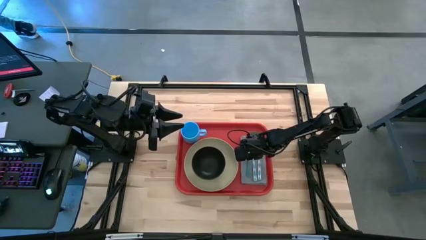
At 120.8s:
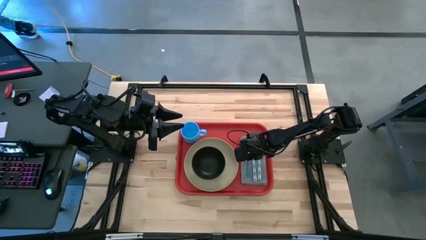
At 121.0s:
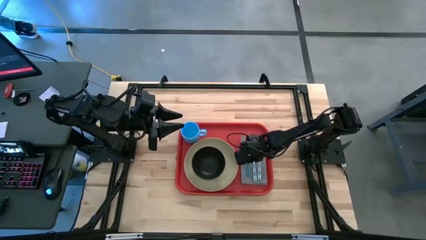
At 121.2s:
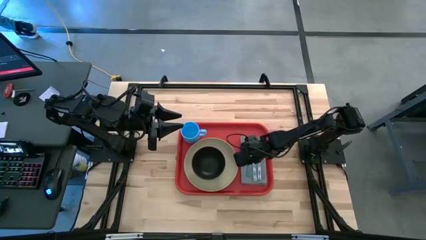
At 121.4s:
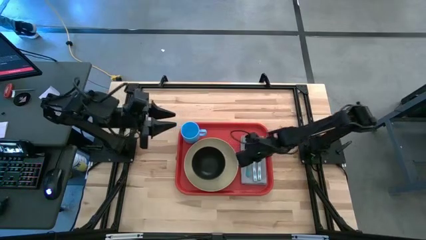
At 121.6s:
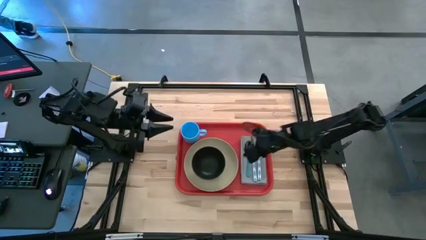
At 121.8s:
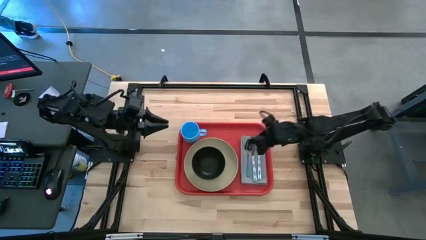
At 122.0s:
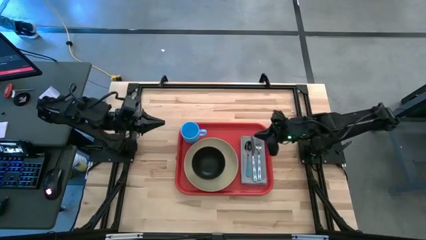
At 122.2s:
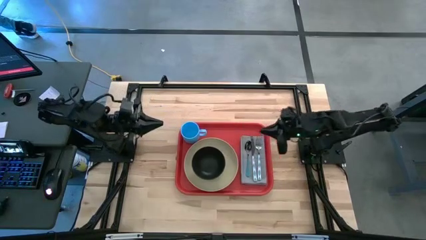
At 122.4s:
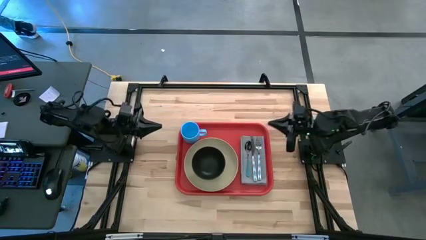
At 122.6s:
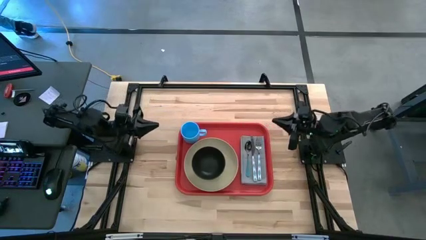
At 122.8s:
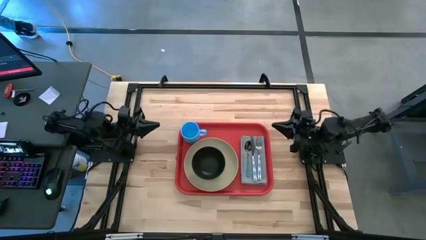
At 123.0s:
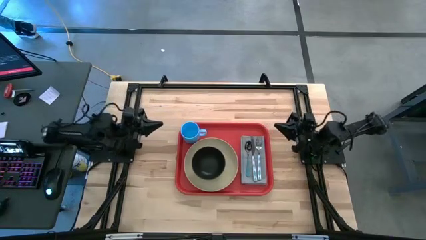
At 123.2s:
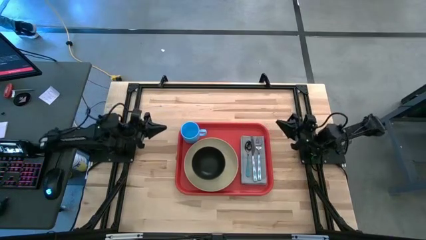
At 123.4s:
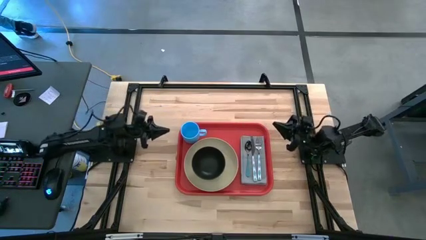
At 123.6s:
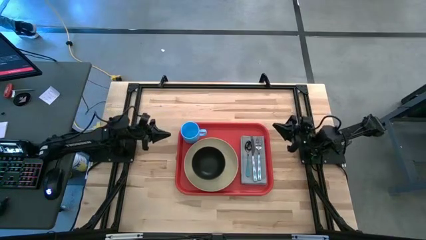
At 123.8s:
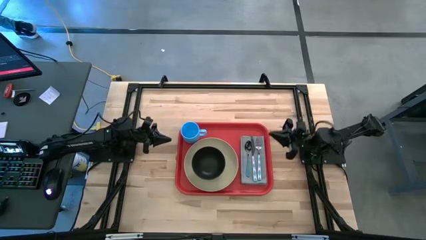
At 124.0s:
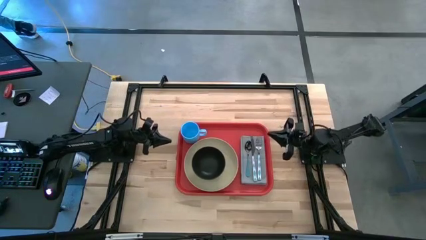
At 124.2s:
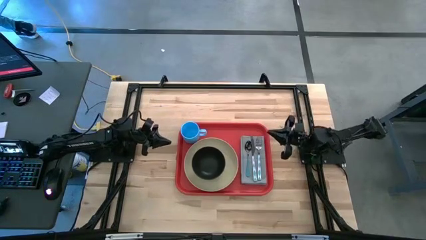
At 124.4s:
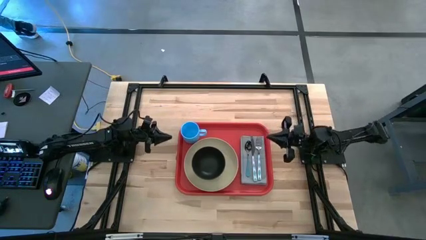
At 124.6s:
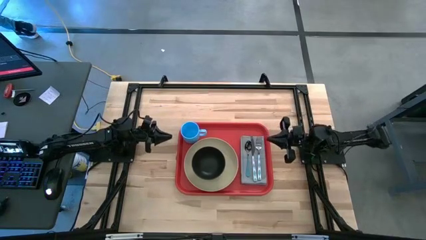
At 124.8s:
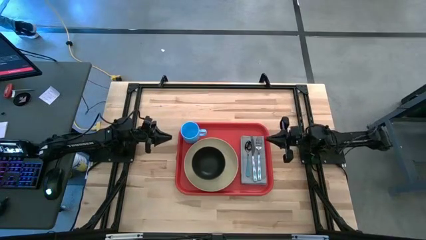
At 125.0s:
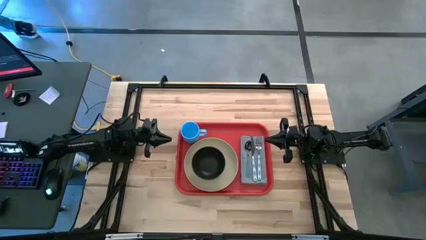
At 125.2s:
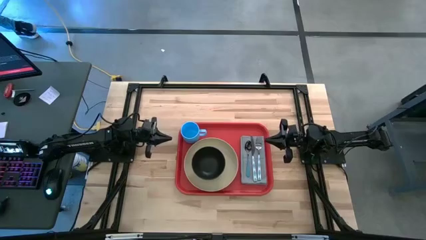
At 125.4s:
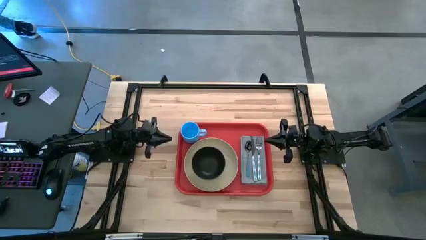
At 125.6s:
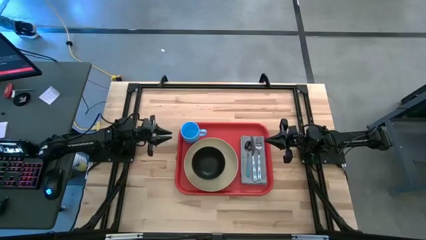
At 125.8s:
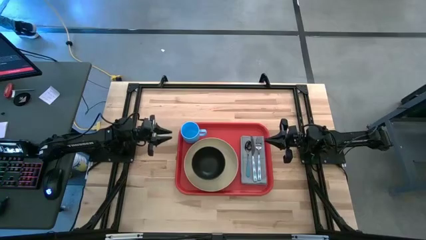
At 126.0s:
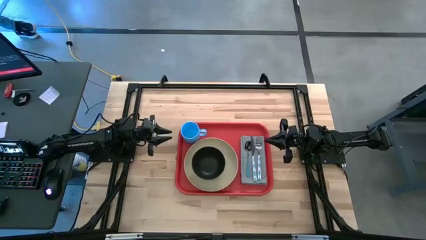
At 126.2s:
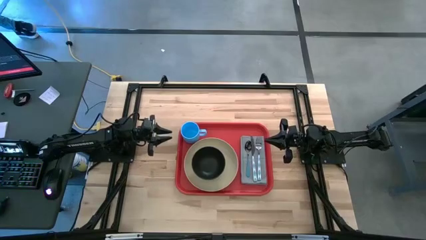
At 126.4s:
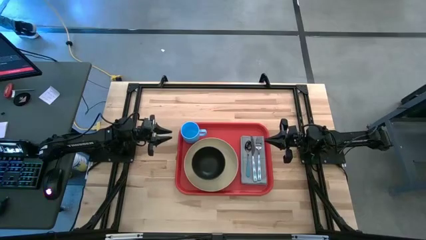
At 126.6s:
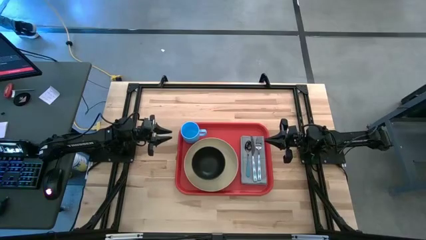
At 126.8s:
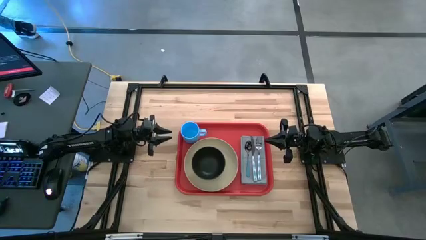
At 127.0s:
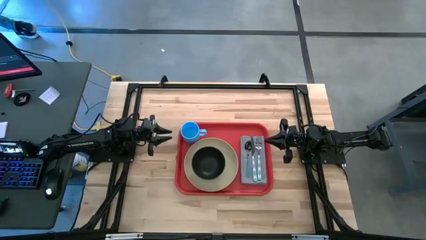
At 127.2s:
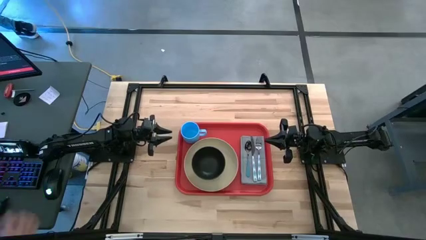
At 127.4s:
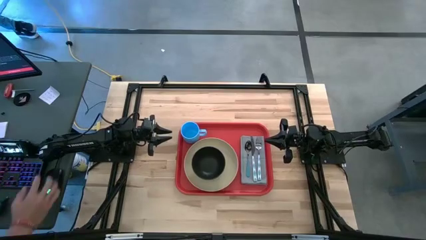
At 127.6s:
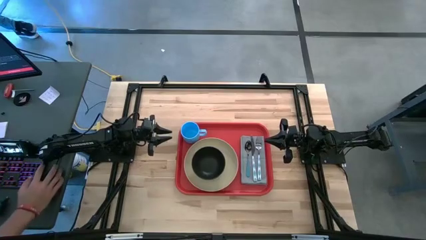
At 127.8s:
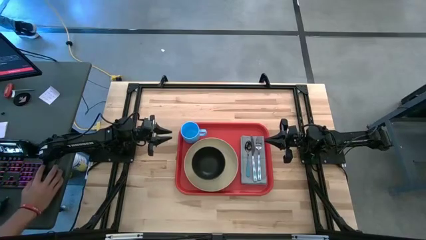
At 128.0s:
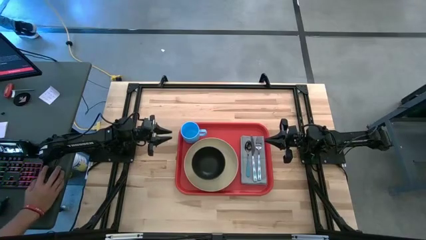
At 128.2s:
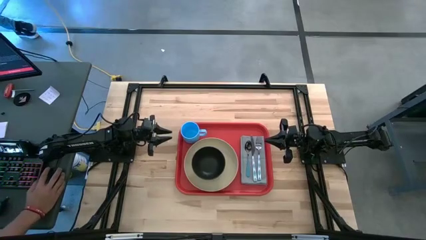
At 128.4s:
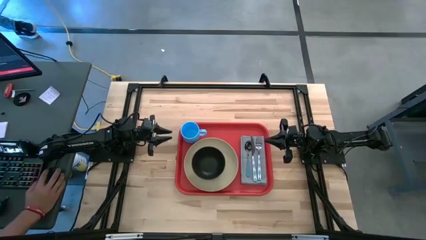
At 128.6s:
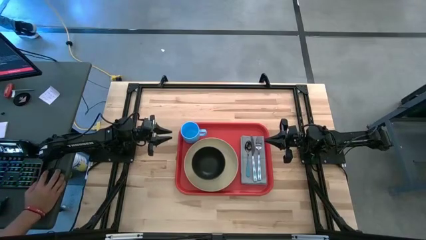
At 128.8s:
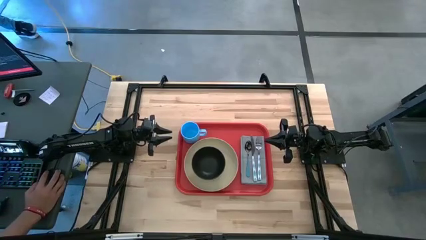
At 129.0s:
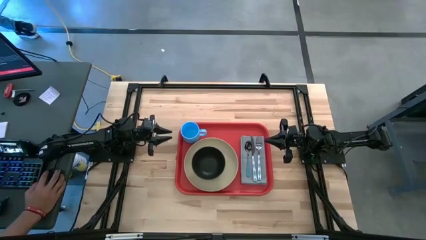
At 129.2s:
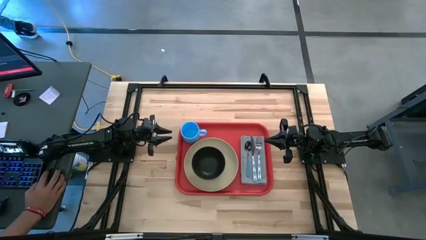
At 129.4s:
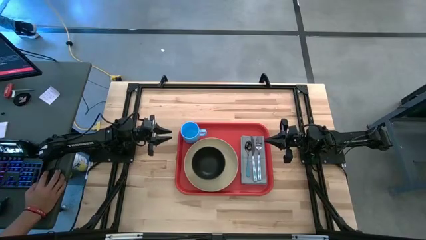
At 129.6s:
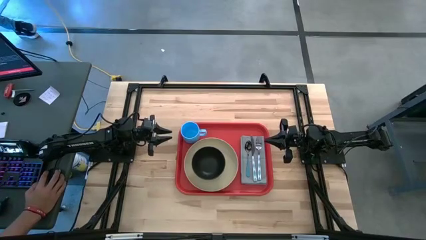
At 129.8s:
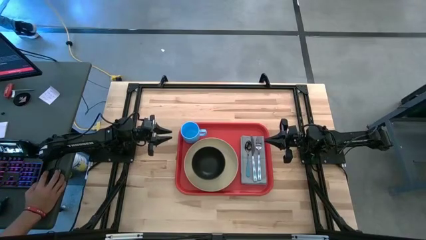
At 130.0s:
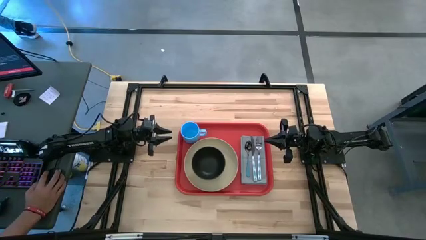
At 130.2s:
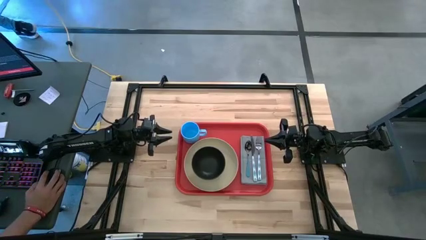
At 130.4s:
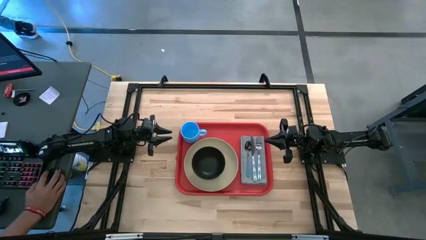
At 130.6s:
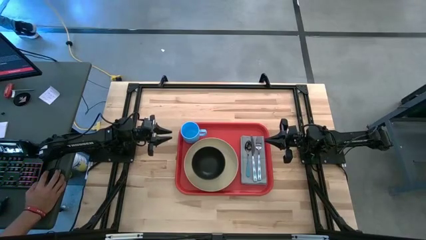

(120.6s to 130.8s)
Task: Set up tray
Return to Home Position

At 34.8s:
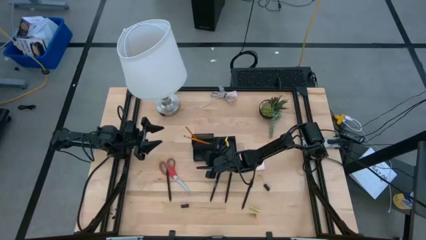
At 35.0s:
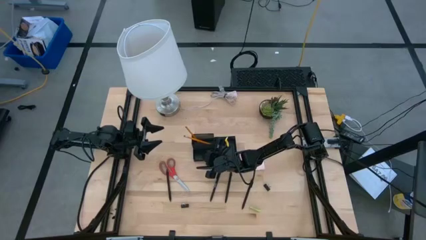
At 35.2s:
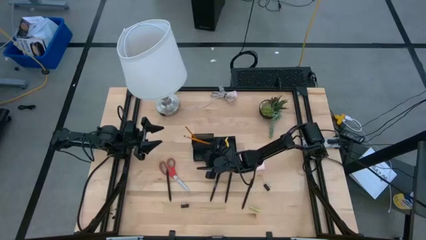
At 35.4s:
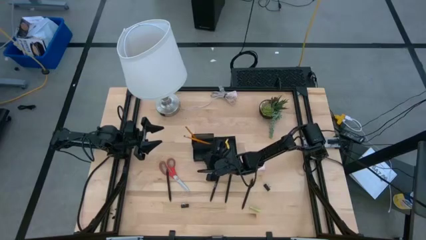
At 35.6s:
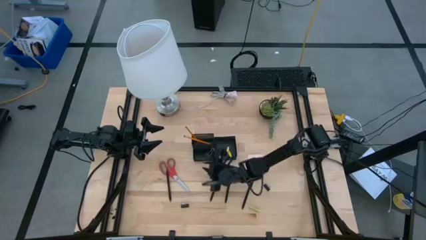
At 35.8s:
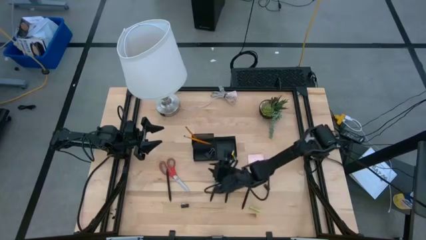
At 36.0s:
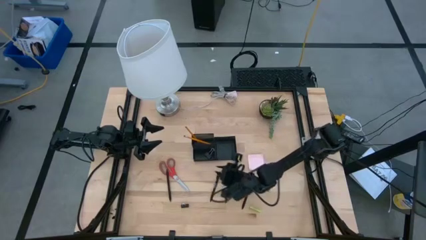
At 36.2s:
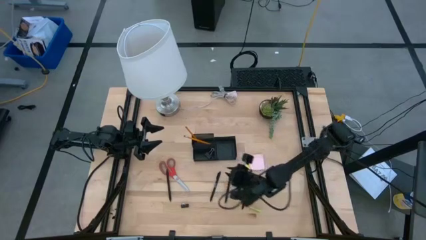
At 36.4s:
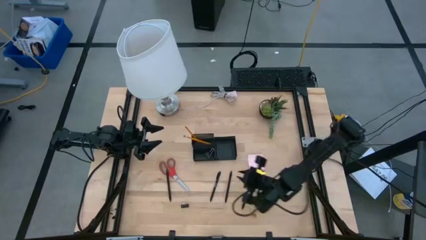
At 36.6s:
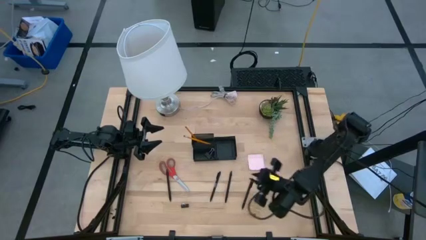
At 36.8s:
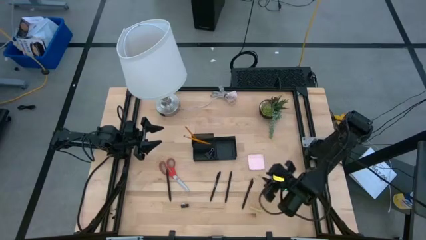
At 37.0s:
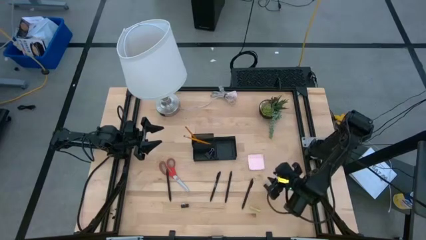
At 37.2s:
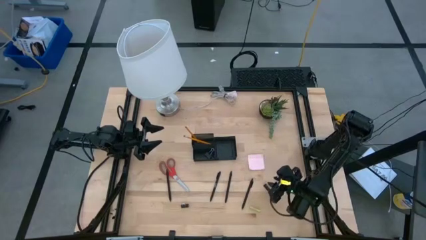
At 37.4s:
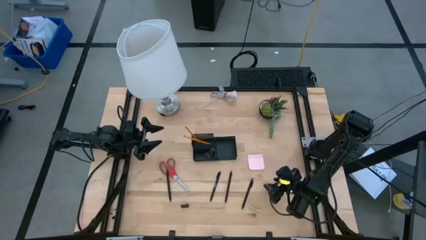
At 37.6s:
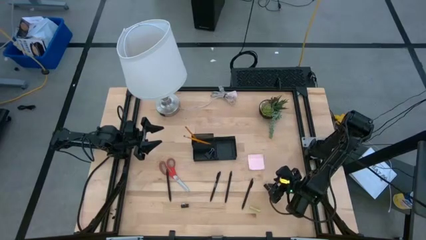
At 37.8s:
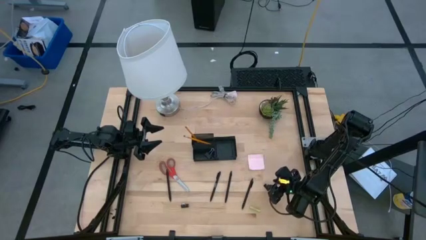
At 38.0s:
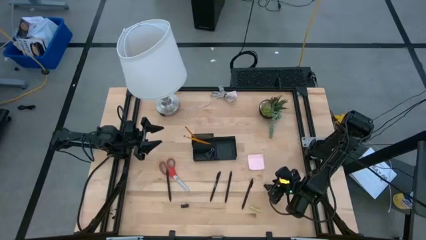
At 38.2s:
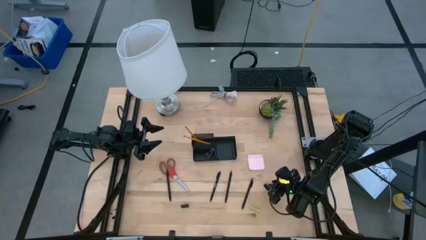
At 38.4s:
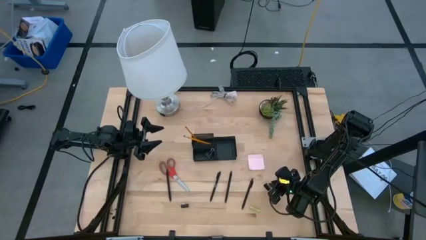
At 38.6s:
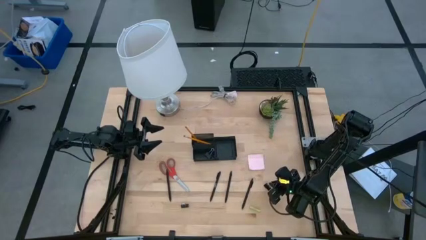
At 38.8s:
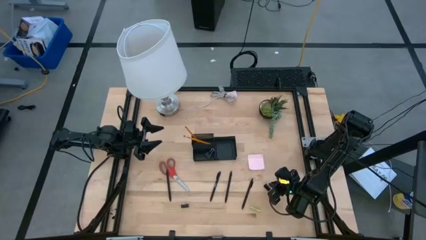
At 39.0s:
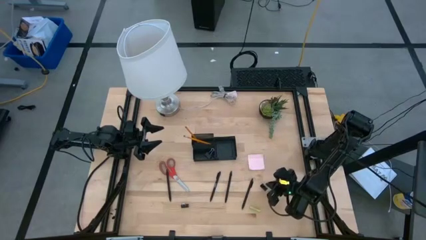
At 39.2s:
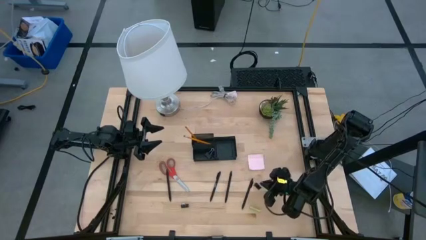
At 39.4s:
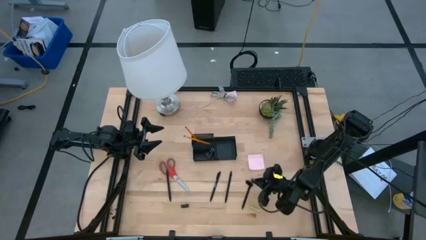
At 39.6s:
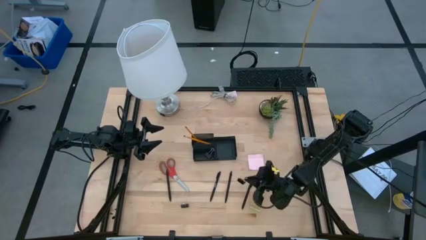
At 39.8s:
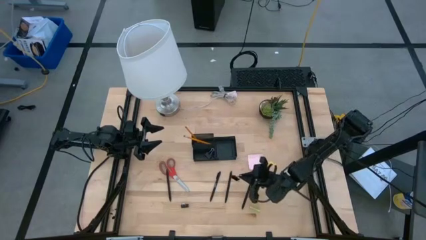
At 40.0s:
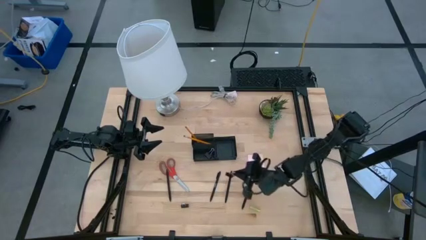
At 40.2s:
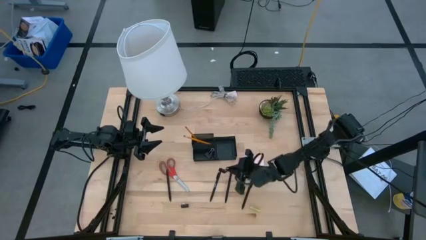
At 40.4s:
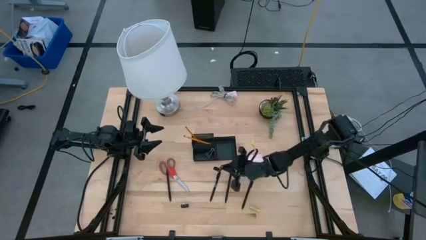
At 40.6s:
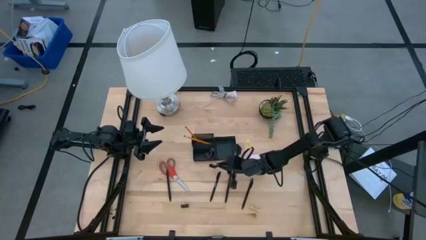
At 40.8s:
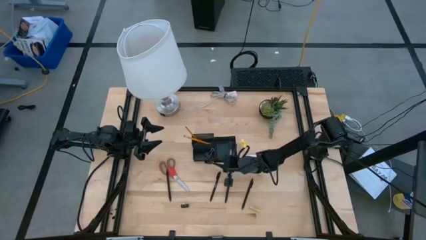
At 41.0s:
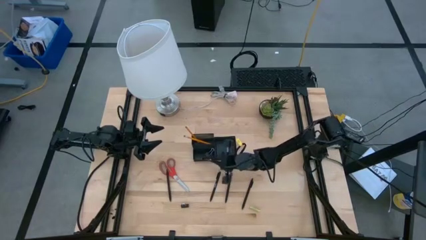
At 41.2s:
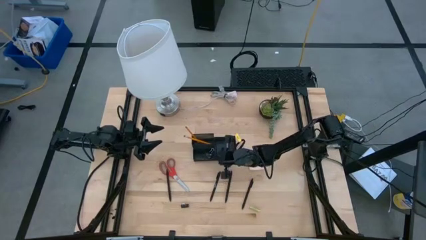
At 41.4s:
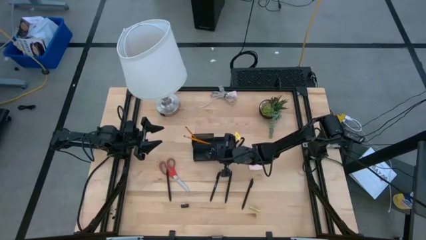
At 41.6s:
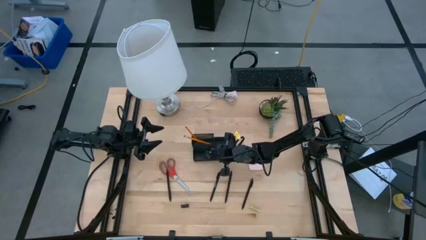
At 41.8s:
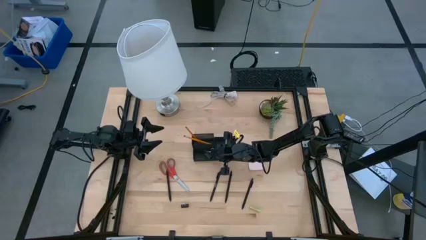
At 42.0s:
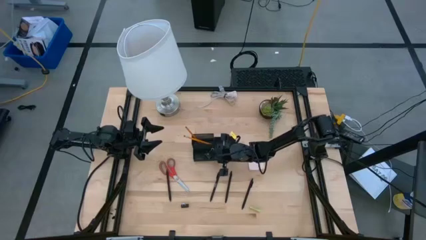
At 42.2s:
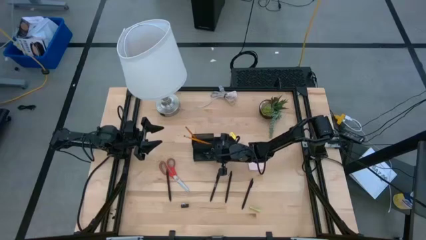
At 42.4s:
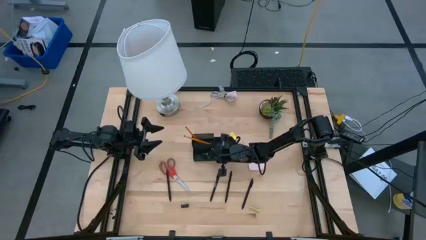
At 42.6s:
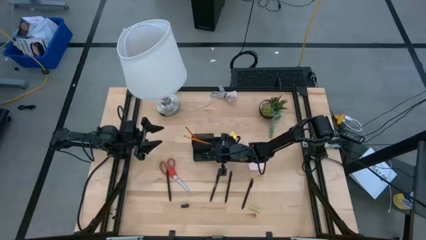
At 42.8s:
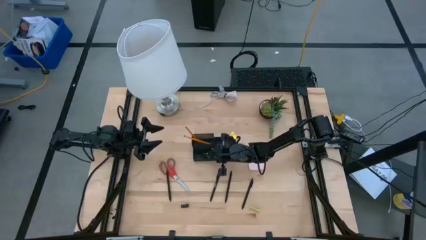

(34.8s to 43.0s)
Task: Pick and place office supplies into organizer
Put the black binder clip into the black desk organizer
